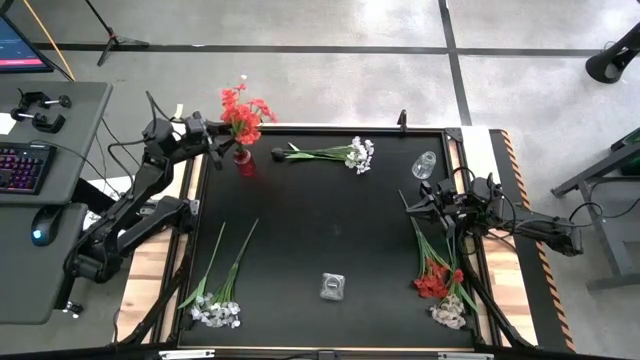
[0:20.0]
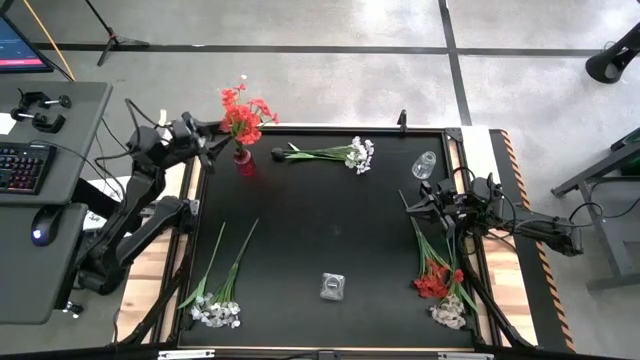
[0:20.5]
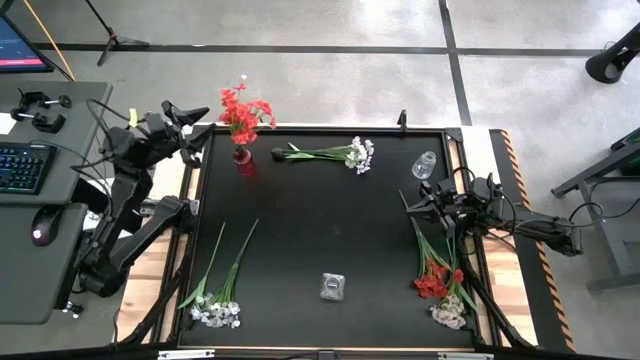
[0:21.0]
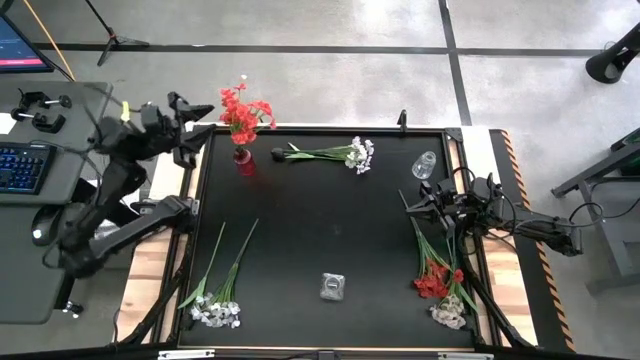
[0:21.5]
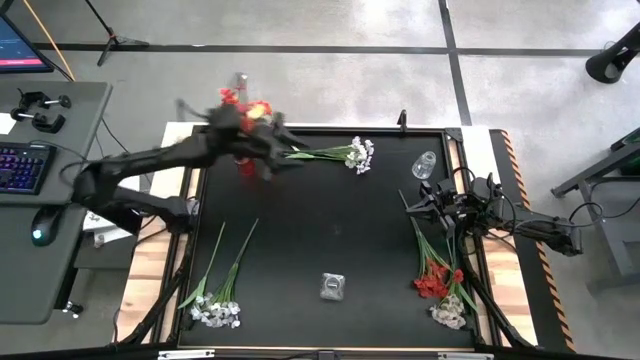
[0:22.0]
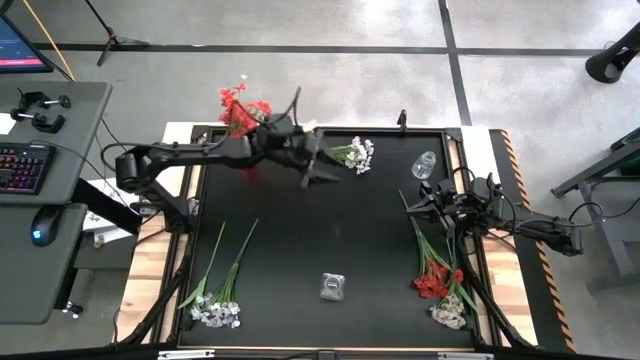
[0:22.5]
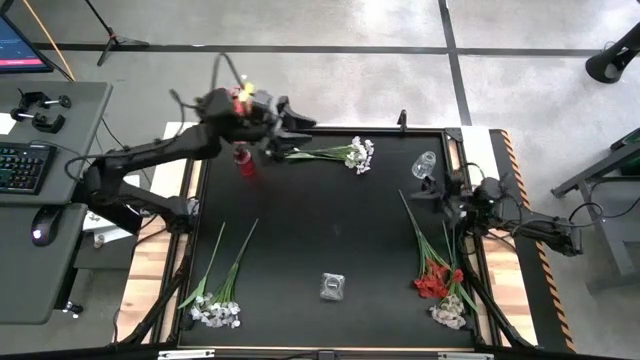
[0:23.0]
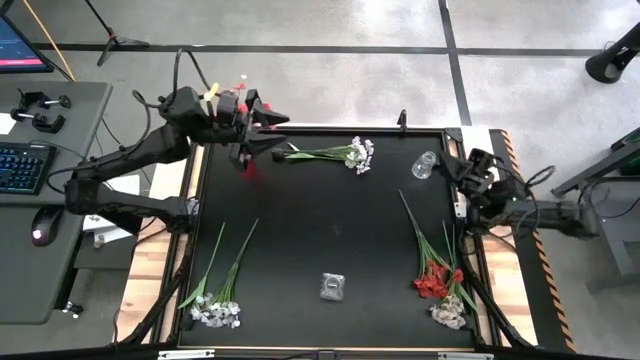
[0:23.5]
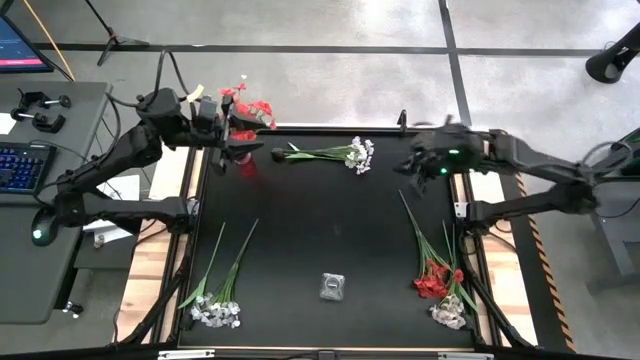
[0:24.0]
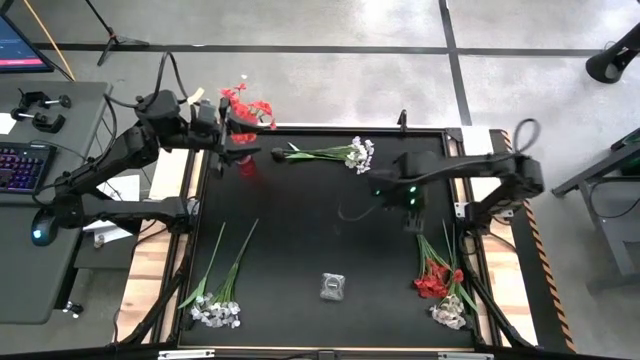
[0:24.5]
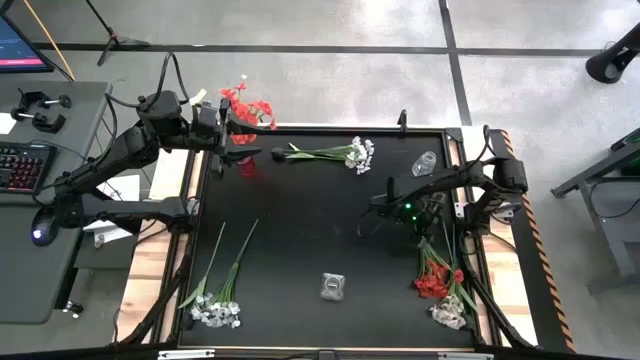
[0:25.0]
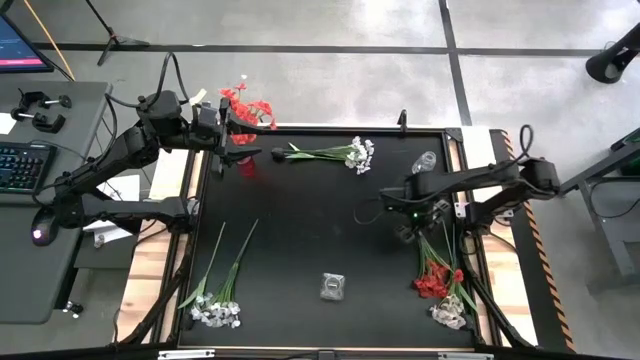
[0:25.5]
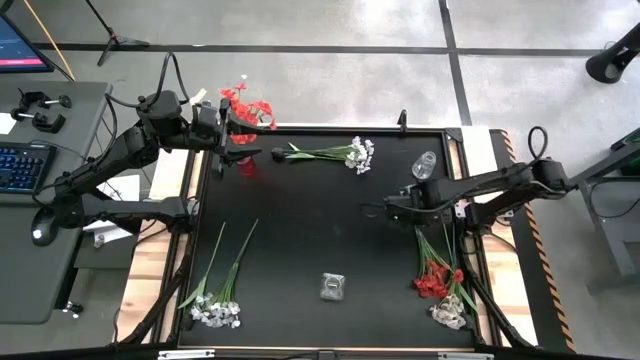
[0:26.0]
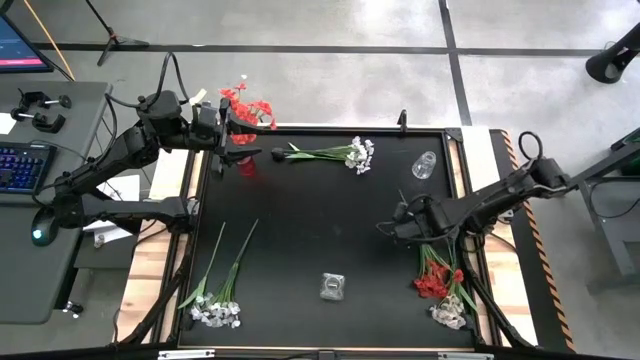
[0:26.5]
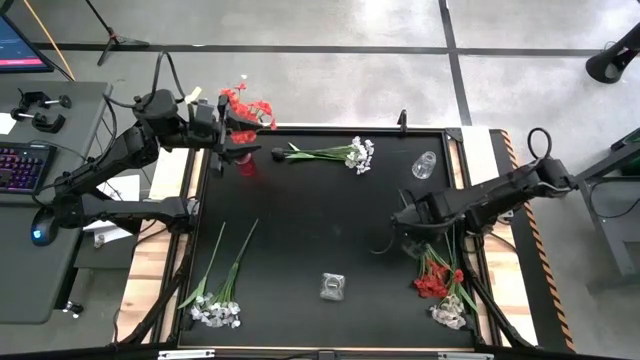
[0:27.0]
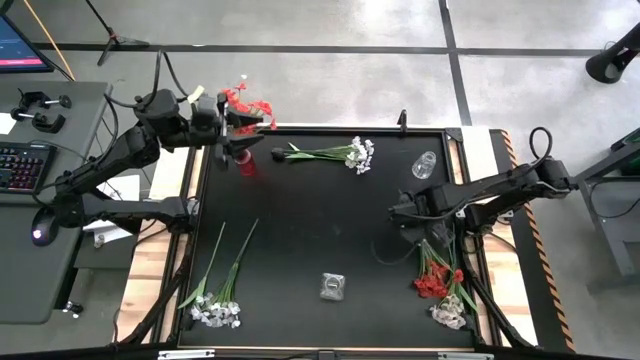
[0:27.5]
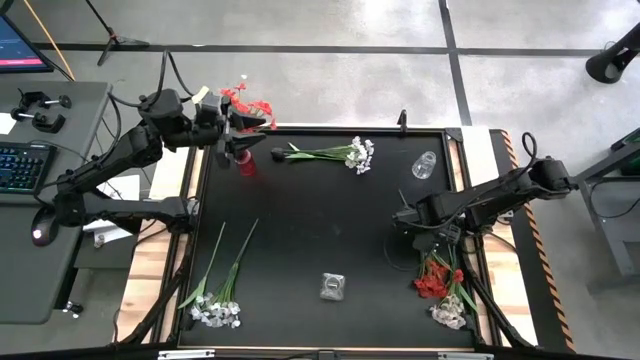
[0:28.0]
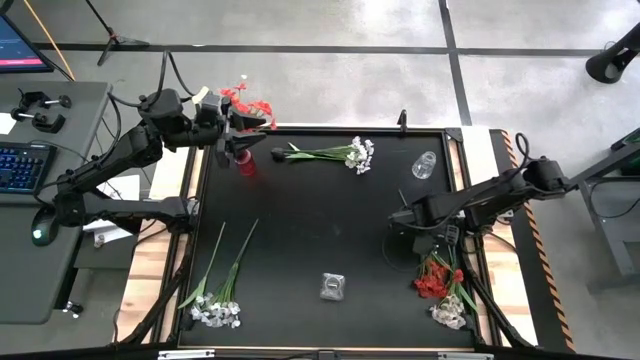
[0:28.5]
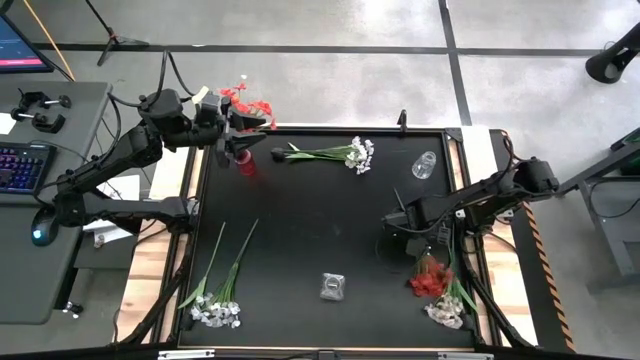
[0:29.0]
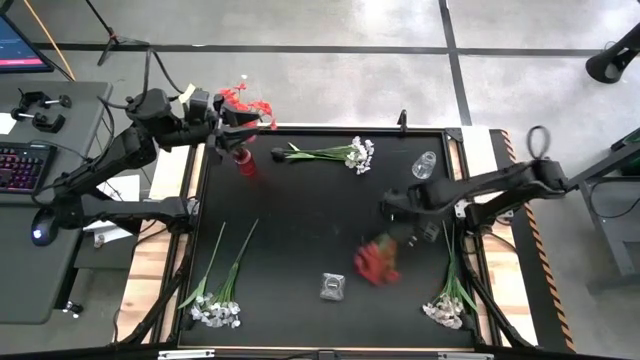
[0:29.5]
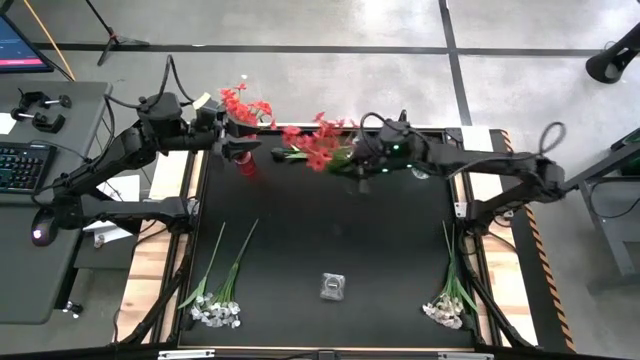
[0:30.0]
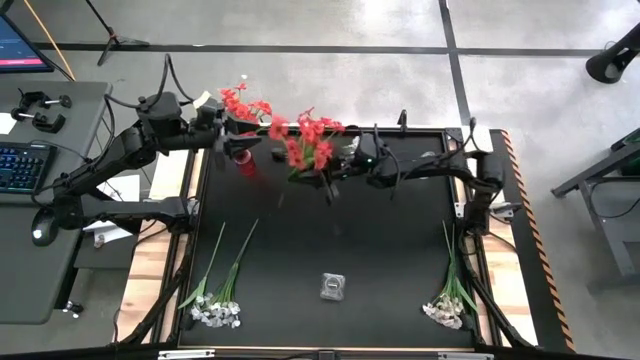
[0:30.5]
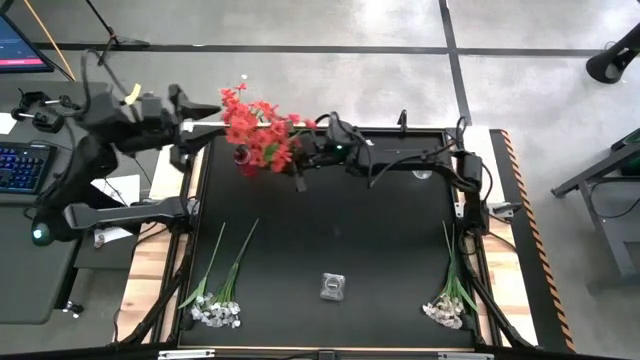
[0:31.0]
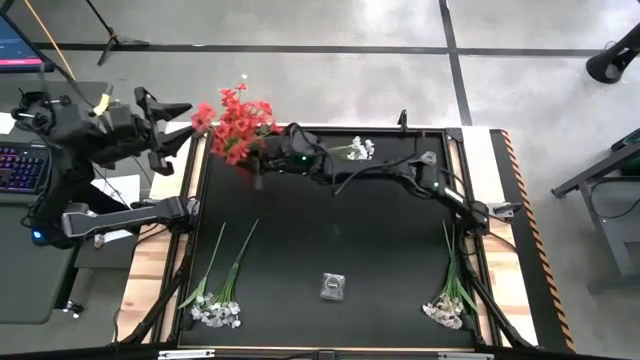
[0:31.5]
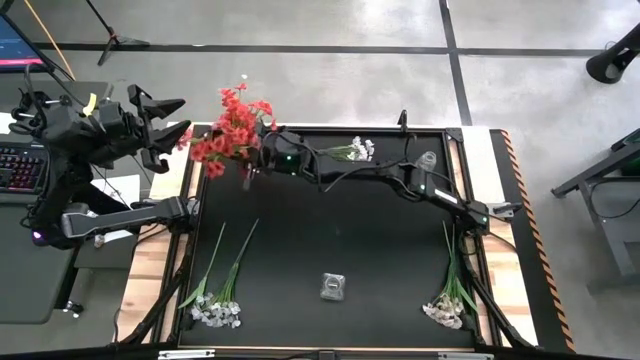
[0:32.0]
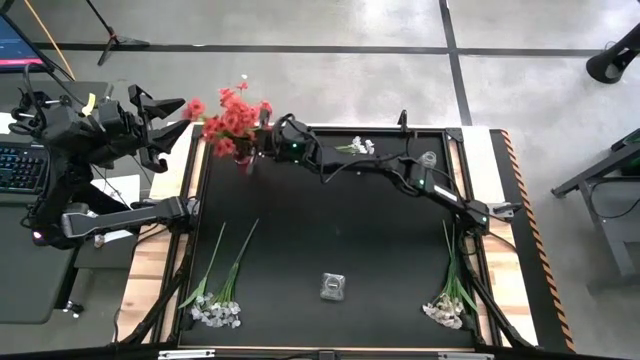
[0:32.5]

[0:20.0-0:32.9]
Task: Sort flowers into vase by color
Put the orange flowers into the red vase

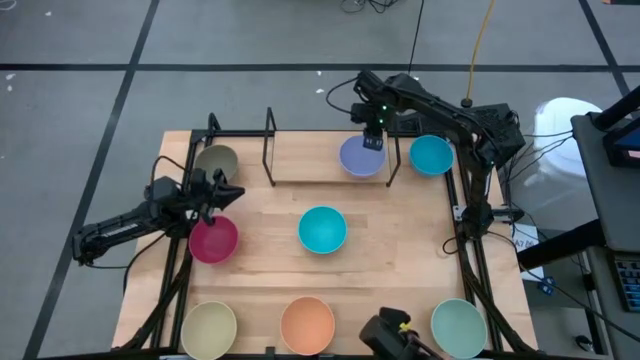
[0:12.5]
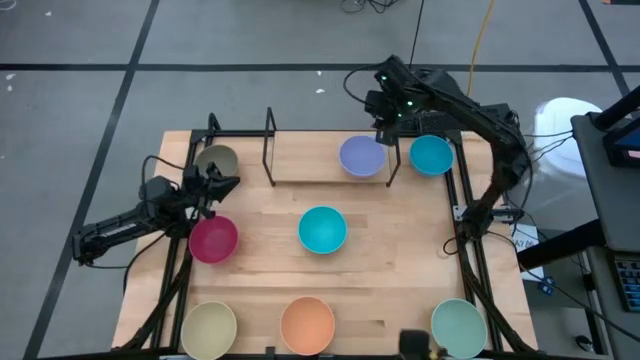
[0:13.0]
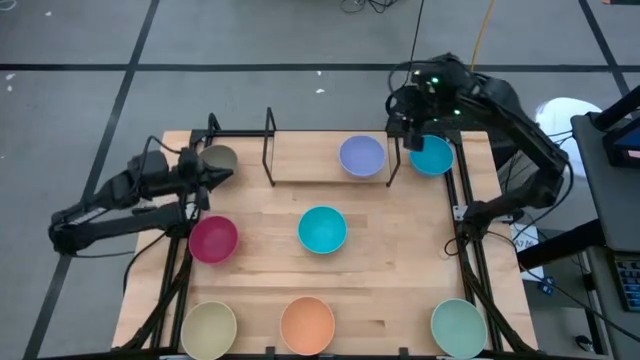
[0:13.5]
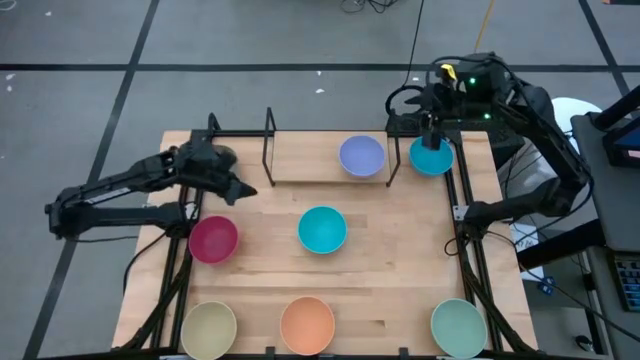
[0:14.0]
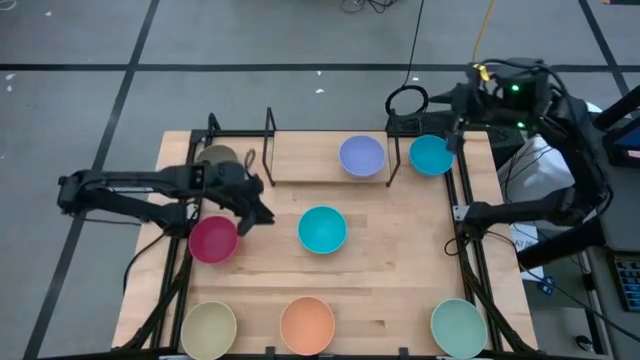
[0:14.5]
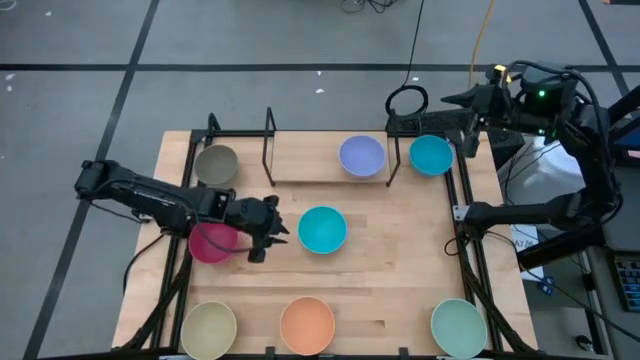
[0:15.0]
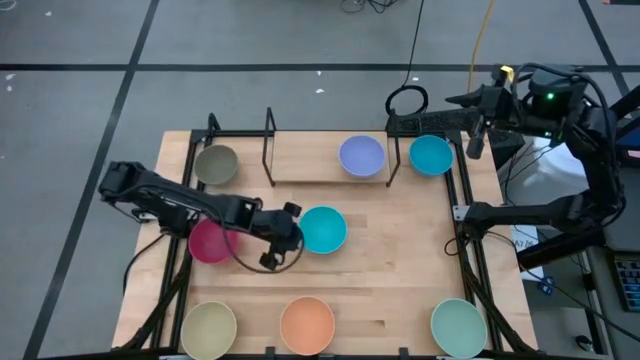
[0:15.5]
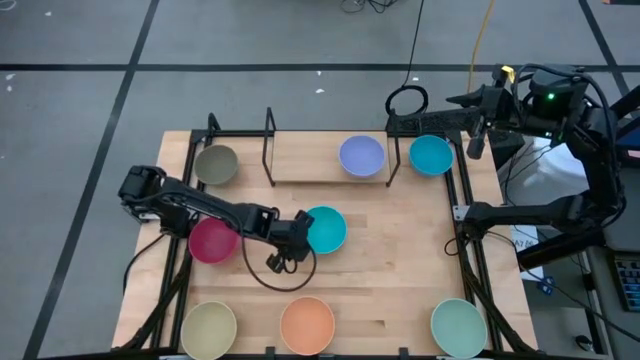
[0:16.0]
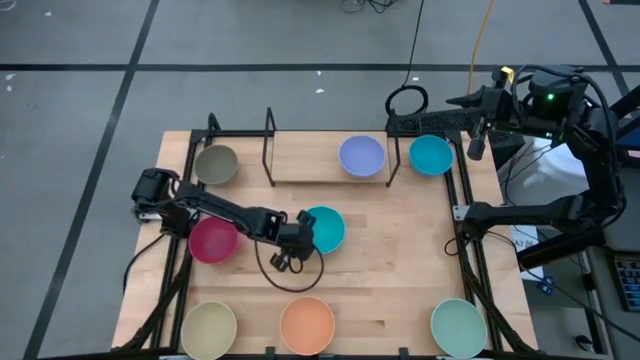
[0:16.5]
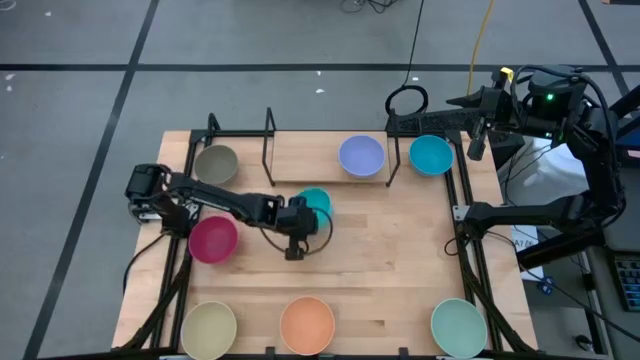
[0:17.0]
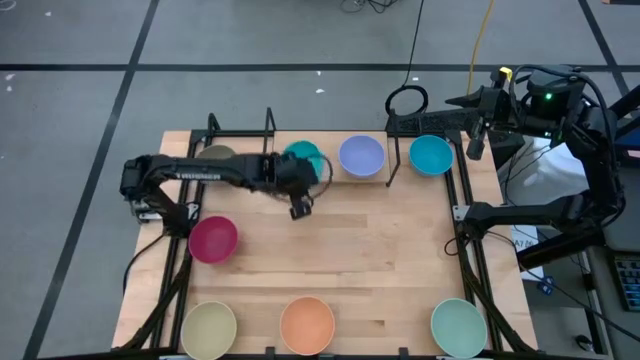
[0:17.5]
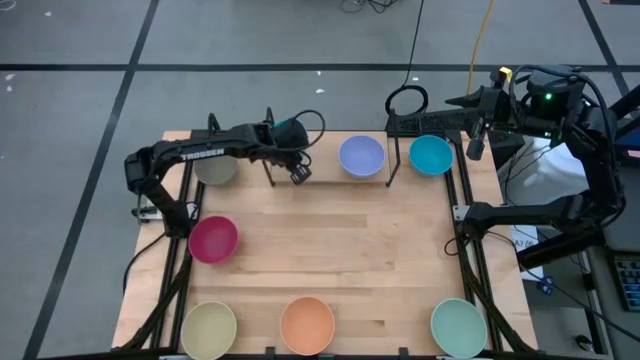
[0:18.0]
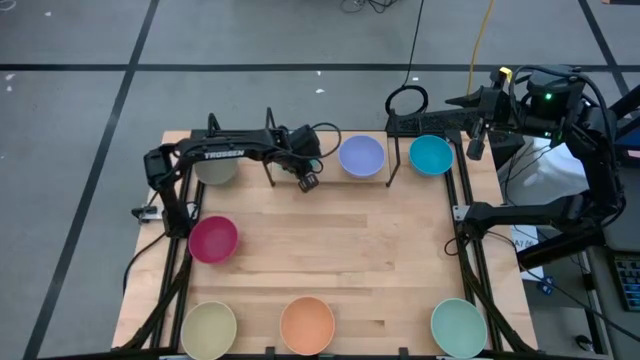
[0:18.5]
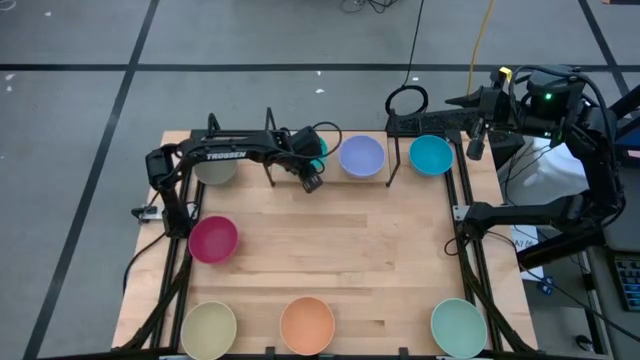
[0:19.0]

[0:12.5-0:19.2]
Task: Place and stack bowls onto a shelf
Put the left blue bowl on the shelf

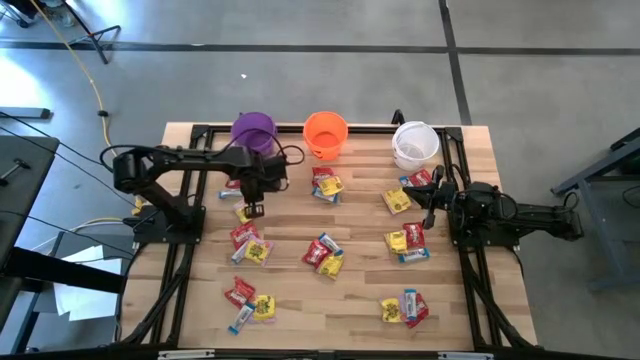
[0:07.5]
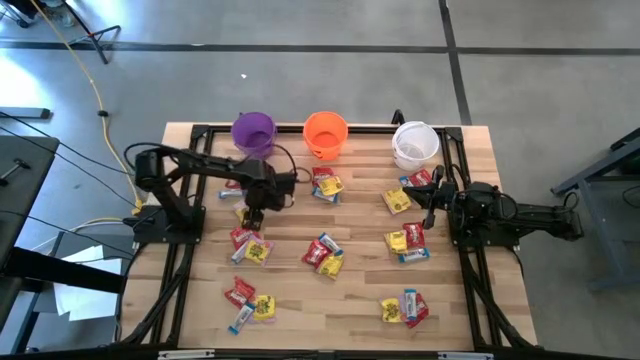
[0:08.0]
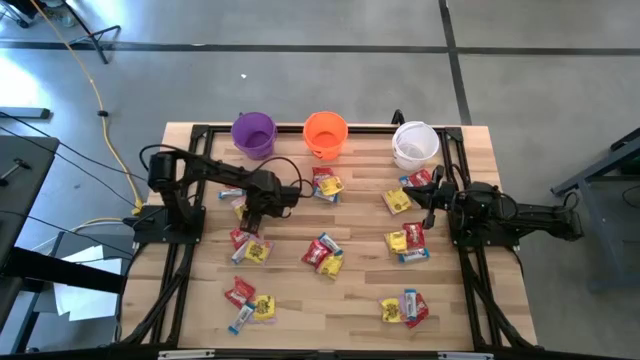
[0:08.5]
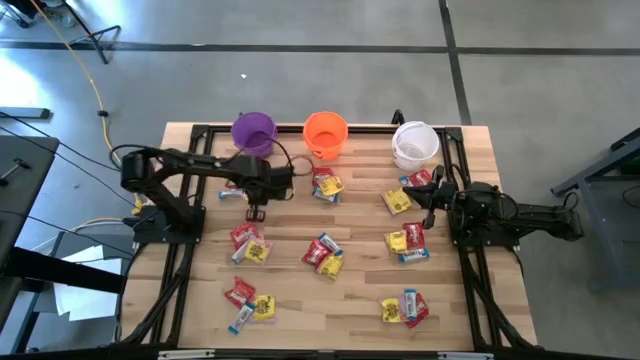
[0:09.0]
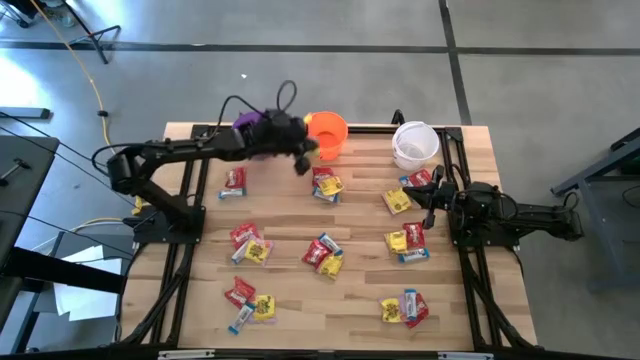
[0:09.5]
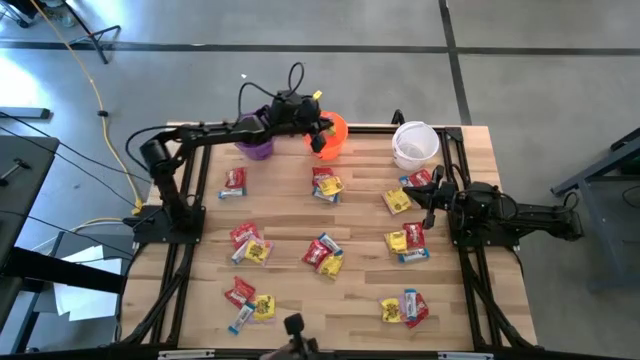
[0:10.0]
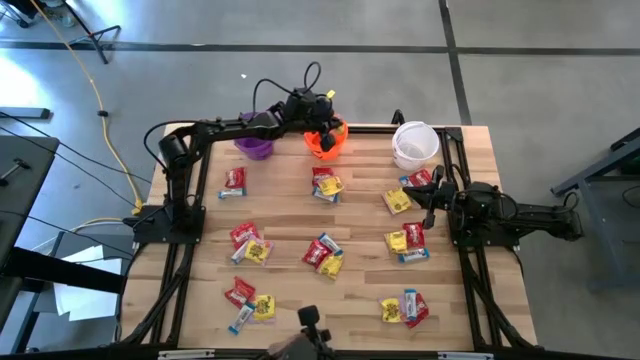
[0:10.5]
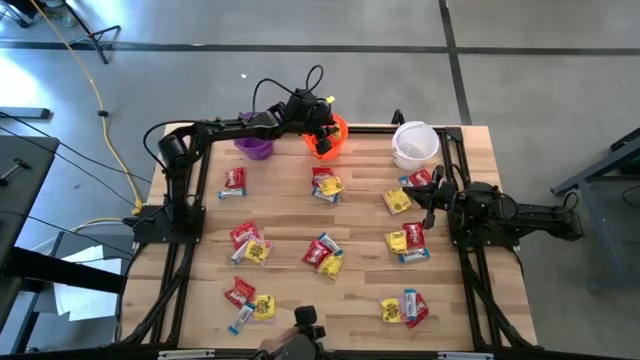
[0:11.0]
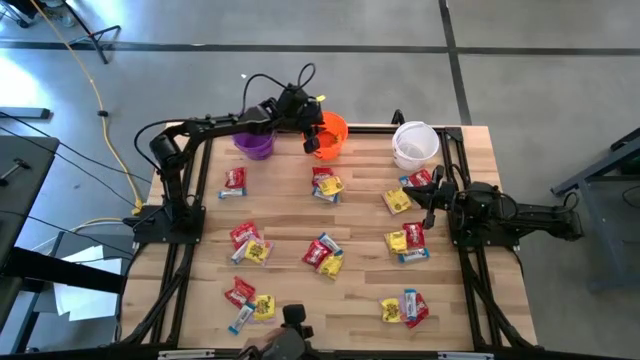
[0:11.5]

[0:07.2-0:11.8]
Task: Sort candy
Put the yellow candy into the orange bucket
